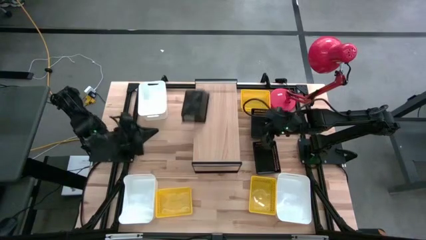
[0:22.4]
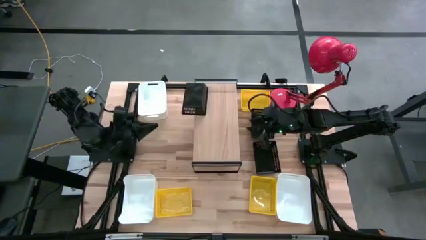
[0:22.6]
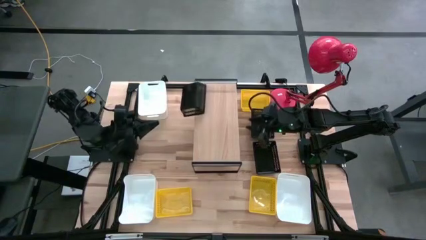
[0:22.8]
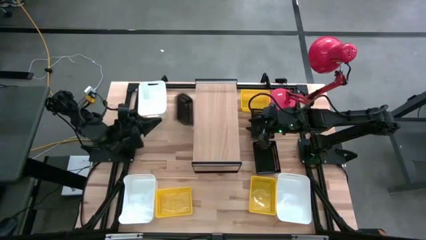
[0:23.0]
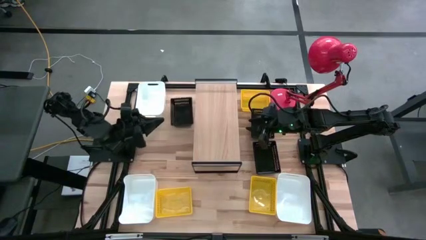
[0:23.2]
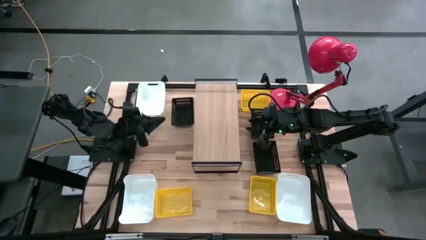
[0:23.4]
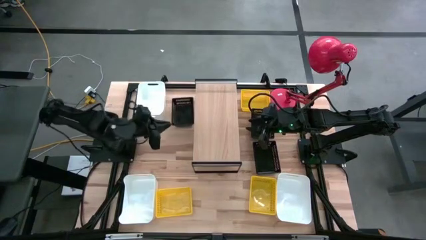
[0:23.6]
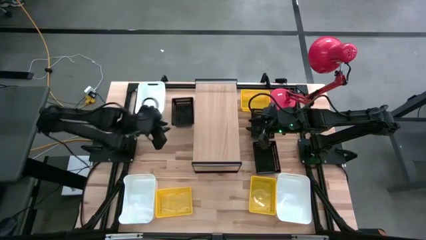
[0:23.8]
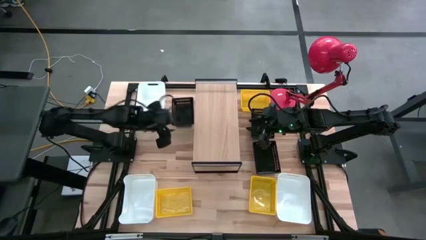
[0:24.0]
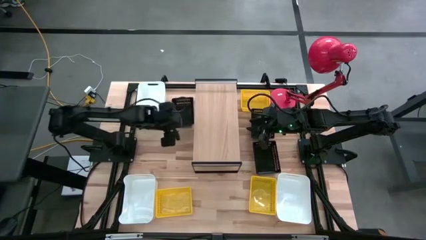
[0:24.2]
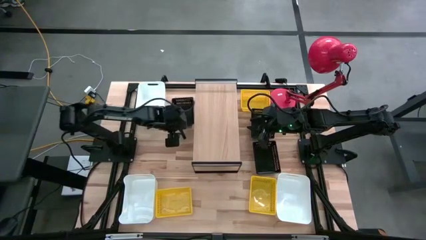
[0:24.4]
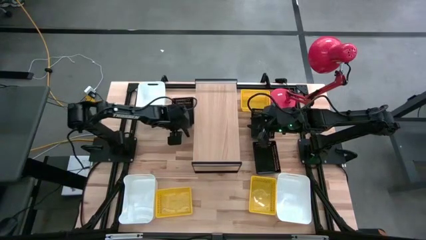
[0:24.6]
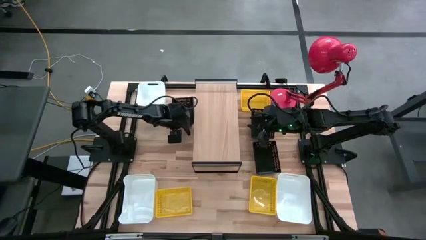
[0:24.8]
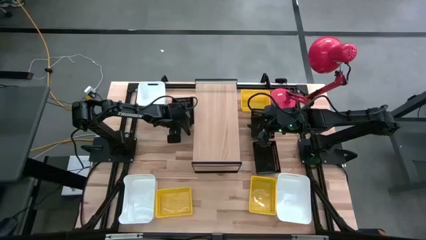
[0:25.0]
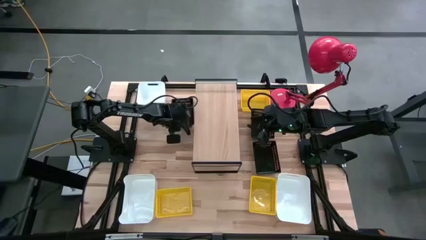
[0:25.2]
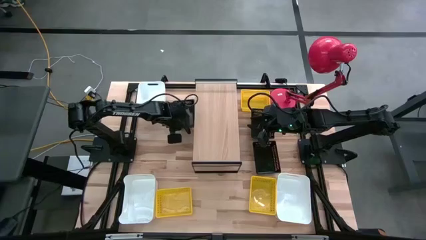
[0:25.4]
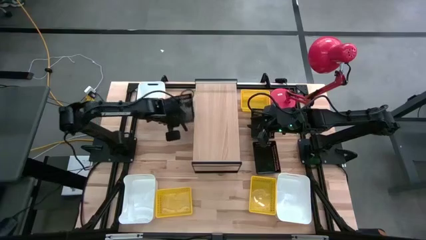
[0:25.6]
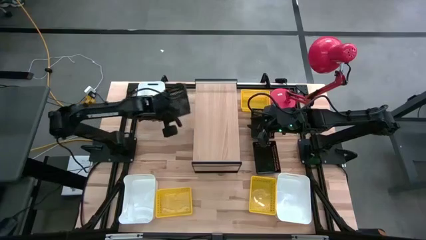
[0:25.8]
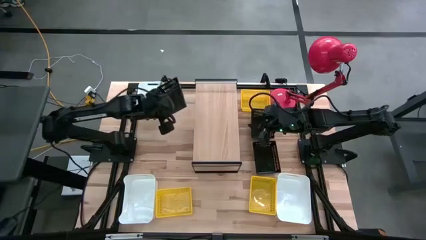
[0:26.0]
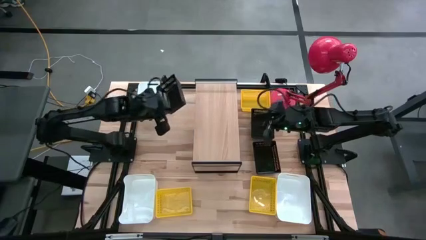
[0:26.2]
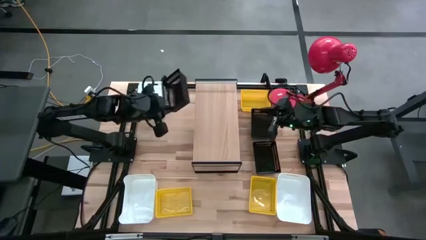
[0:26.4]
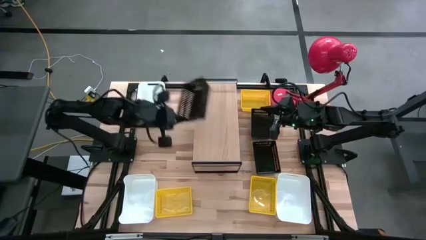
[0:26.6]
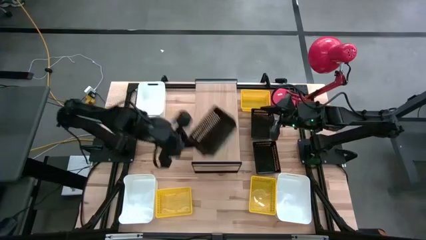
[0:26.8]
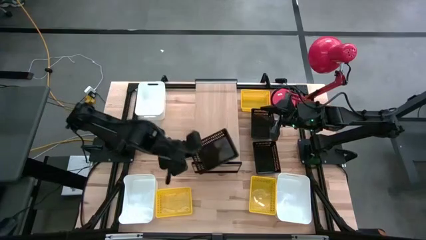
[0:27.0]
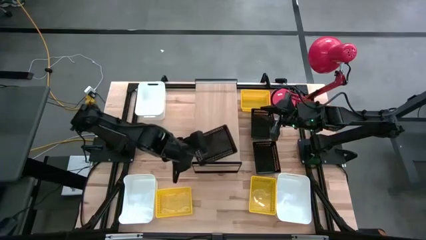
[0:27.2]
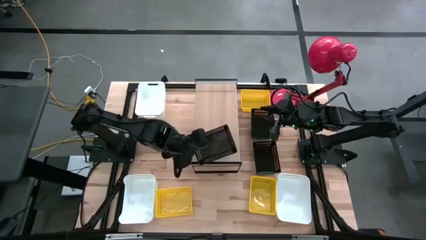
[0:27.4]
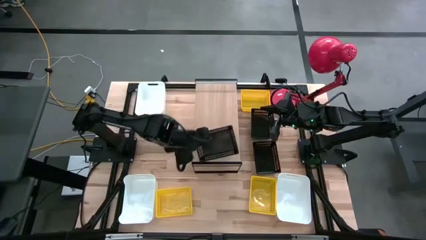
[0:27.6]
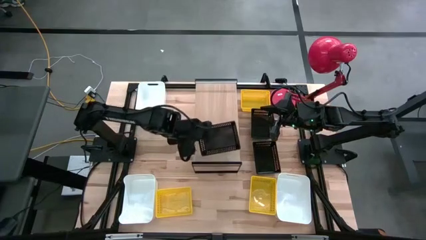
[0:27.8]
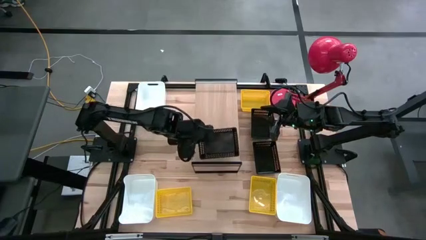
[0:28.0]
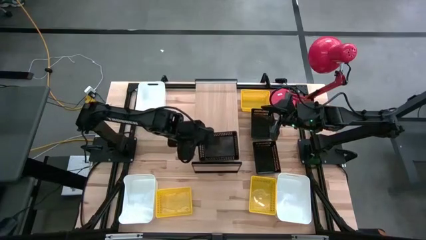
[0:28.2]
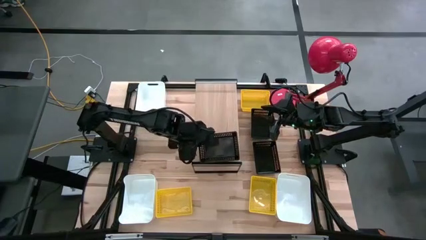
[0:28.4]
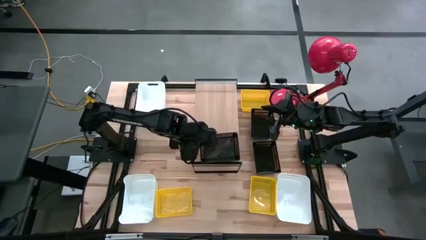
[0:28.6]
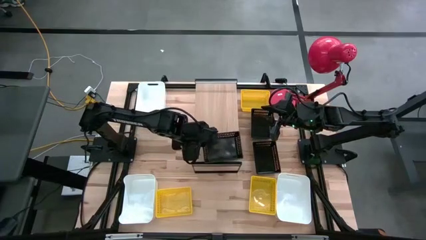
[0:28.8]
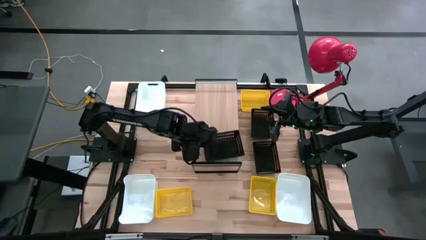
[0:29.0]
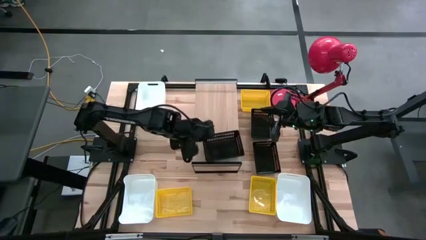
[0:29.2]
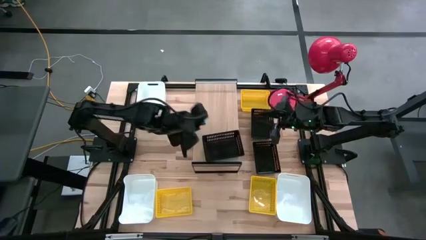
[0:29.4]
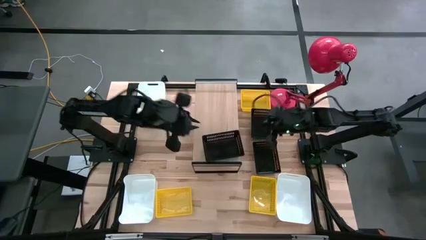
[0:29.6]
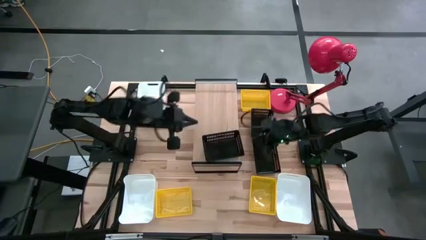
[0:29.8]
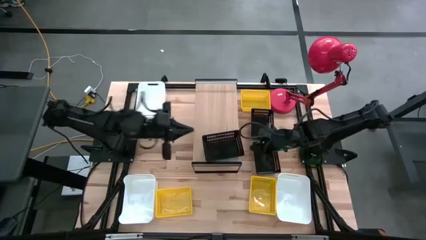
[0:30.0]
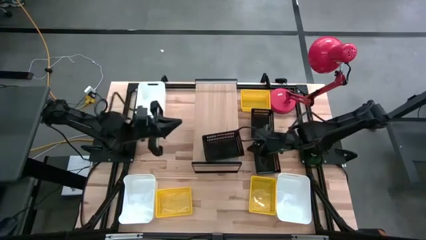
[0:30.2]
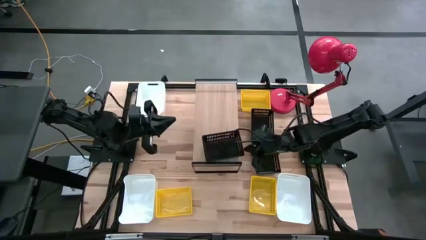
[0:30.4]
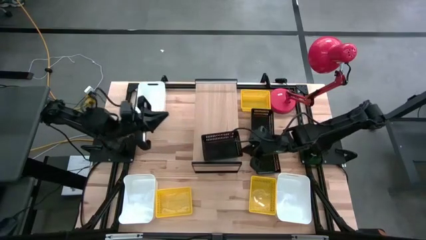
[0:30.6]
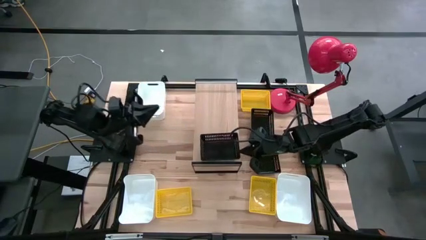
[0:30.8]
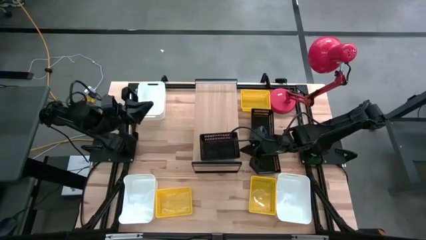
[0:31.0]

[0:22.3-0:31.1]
Task: Stack baskets on shelf by color
Put the top left black bin on the shelf

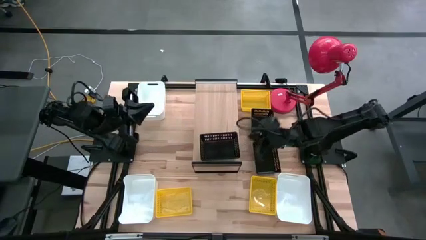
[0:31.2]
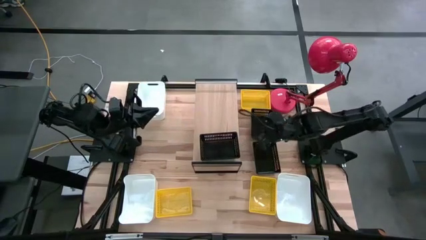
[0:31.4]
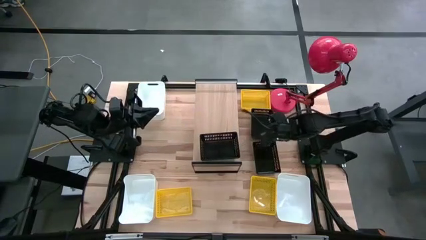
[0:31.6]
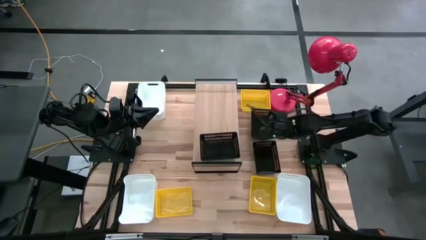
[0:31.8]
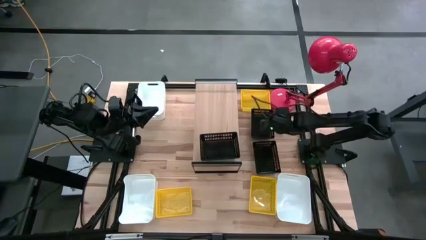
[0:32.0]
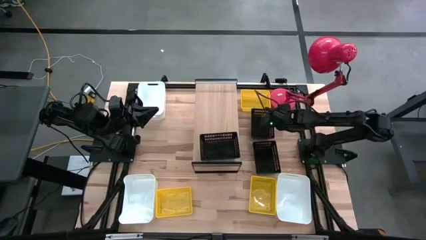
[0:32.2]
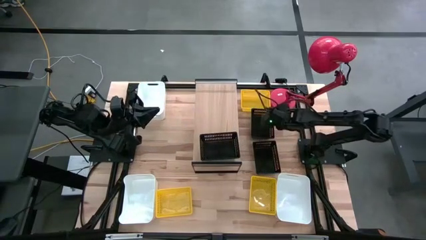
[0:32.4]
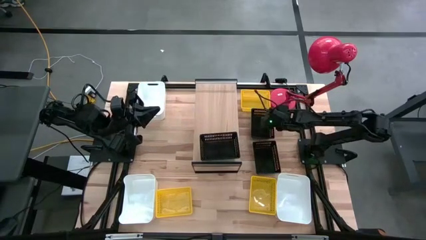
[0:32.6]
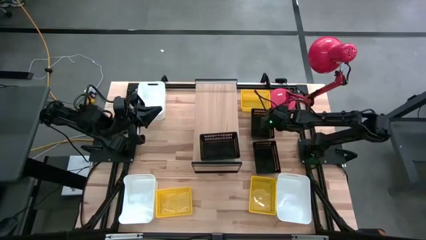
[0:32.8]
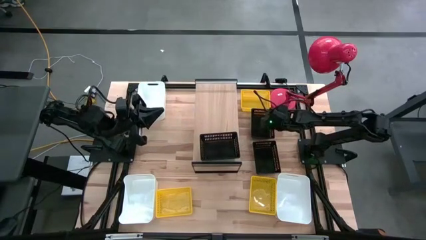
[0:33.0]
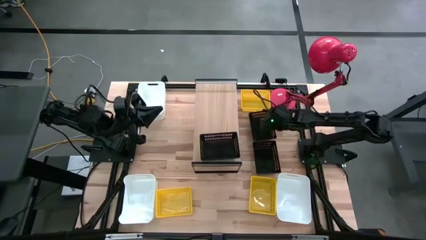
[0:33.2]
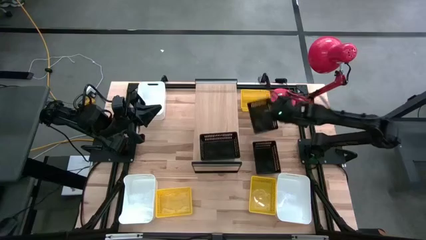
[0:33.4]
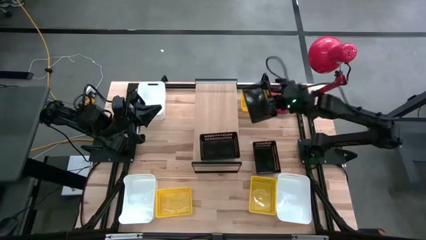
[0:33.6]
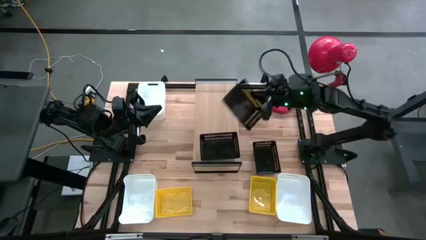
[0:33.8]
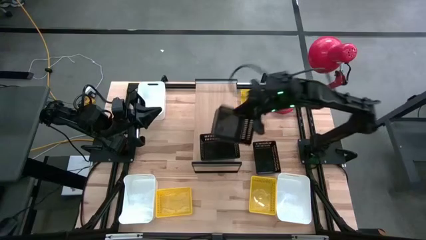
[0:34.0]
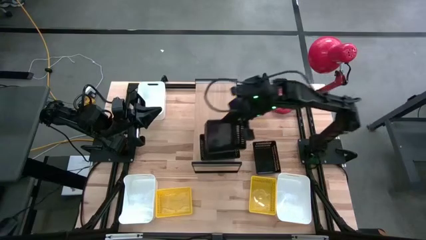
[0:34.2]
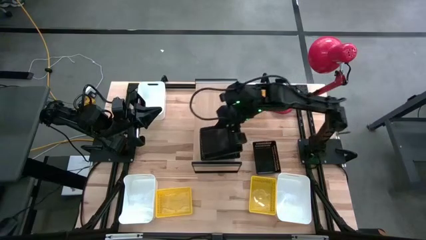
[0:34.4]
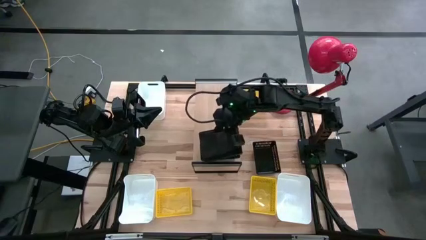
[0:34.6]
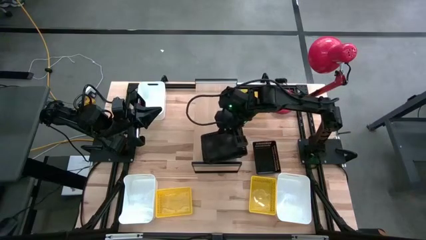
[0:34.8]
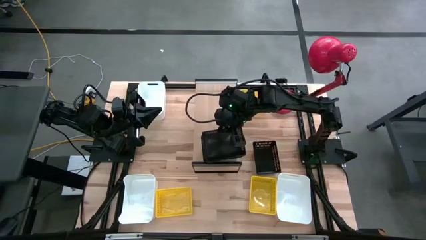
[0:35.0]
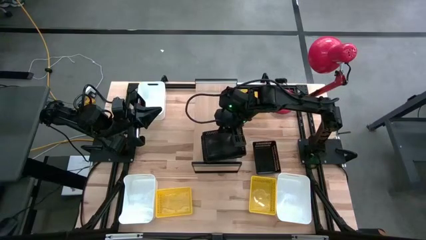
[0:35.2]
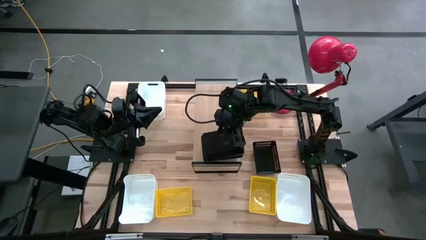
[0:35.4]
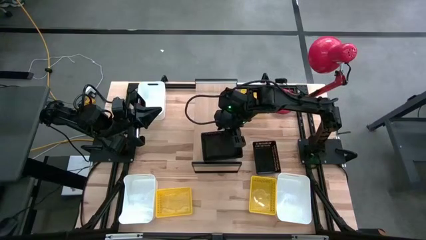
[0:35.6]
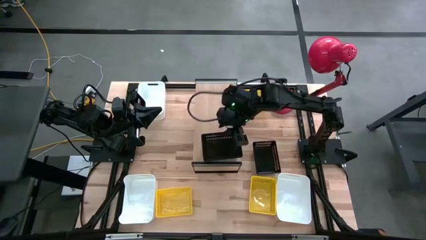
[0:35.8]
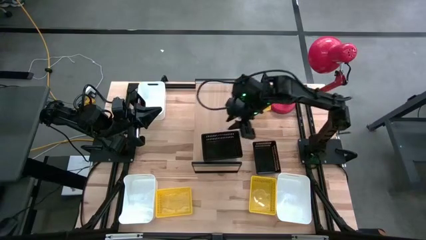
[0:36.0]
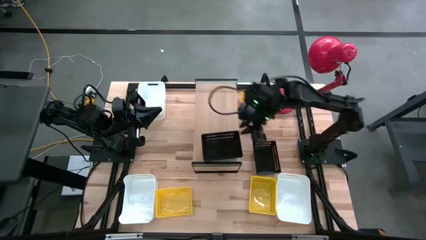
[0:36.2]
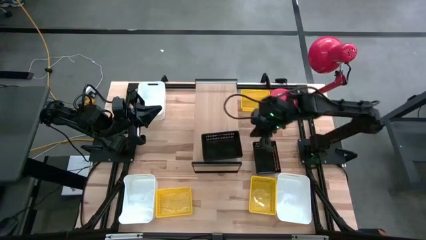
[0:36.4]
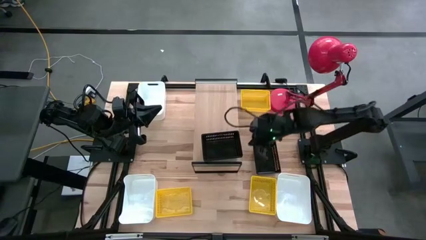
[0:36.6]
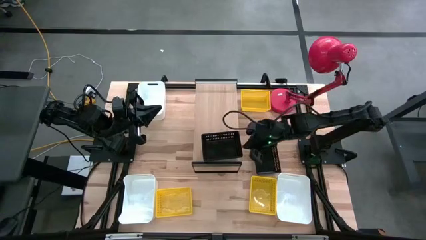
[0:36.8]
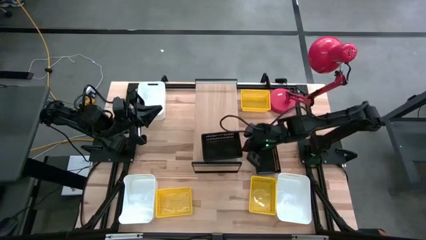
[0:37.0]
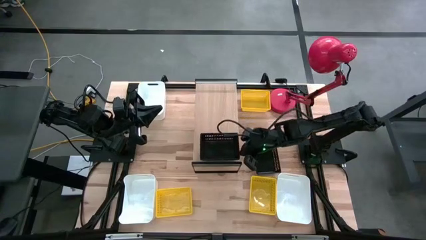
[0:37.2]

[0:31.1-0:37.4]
Stack the top black bin on top of the black bin on the shelf
